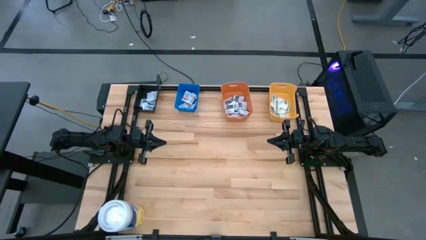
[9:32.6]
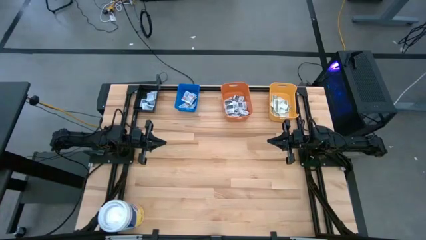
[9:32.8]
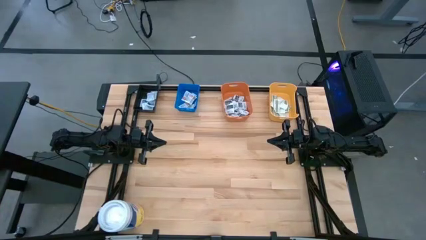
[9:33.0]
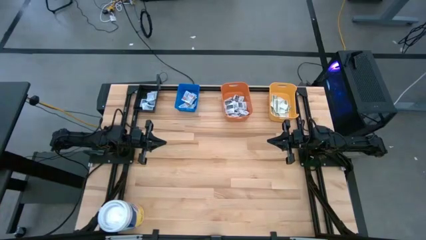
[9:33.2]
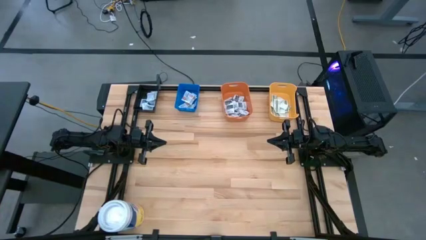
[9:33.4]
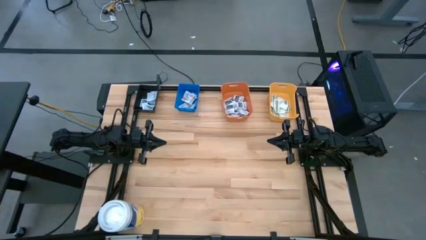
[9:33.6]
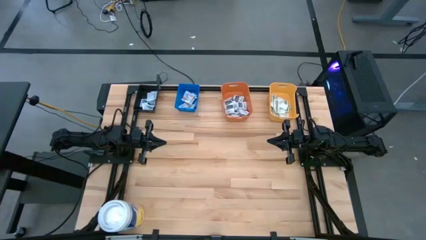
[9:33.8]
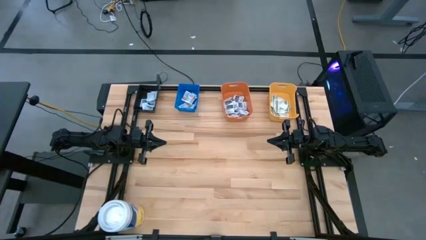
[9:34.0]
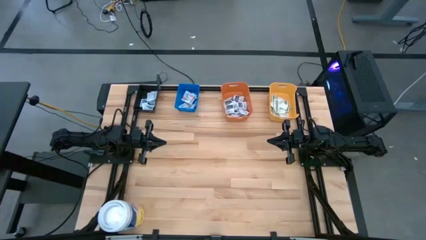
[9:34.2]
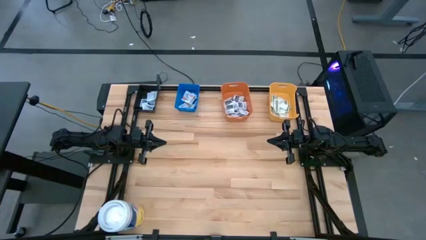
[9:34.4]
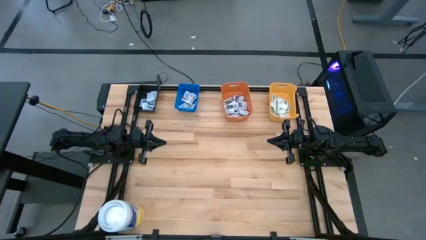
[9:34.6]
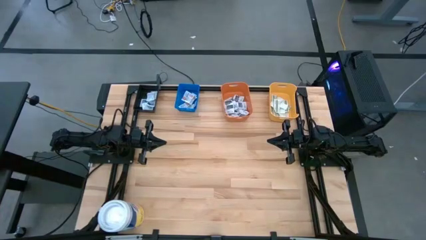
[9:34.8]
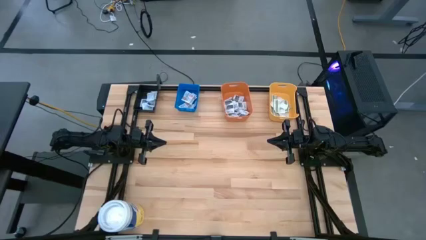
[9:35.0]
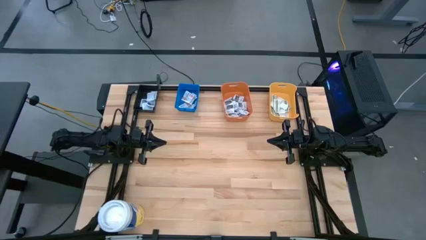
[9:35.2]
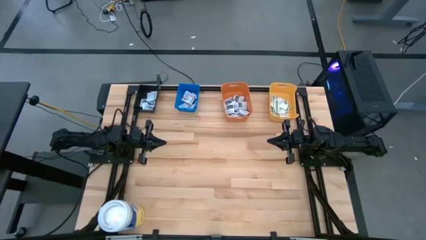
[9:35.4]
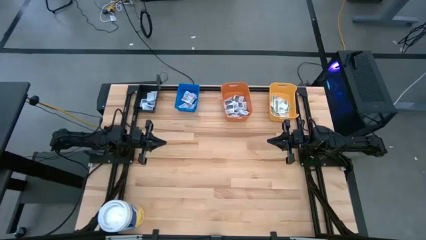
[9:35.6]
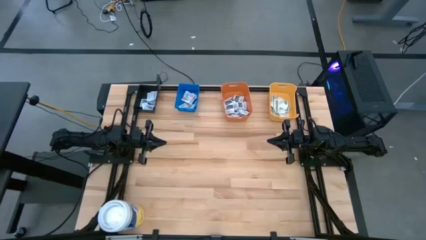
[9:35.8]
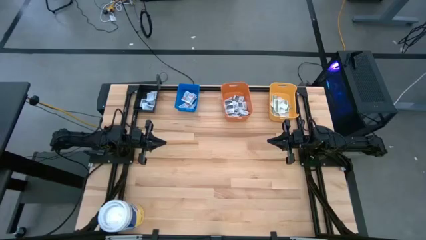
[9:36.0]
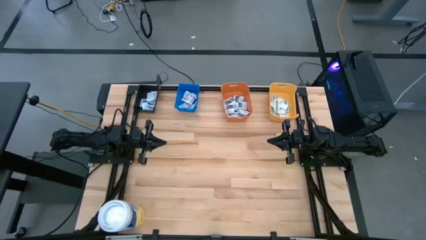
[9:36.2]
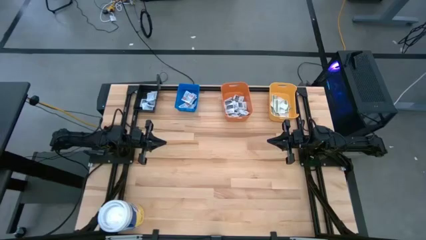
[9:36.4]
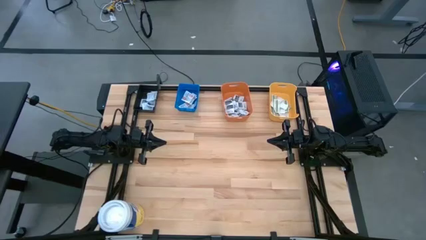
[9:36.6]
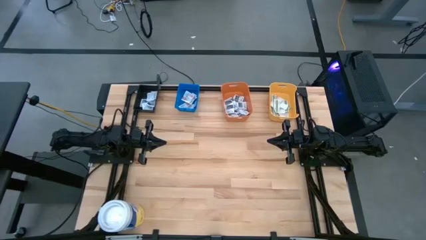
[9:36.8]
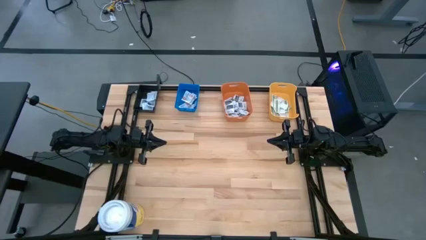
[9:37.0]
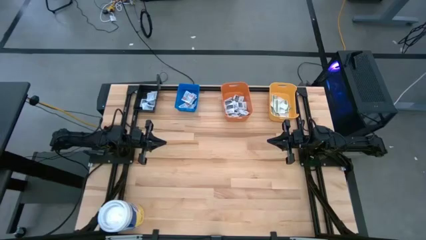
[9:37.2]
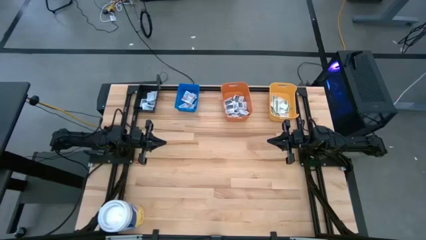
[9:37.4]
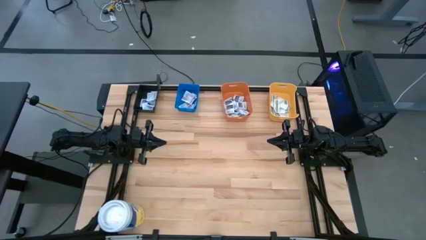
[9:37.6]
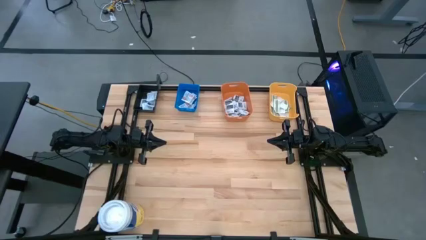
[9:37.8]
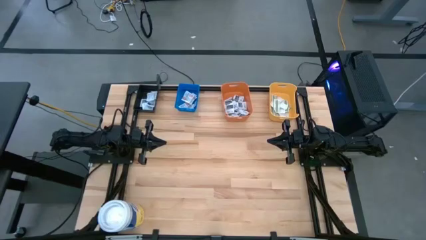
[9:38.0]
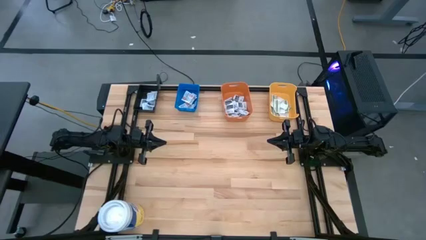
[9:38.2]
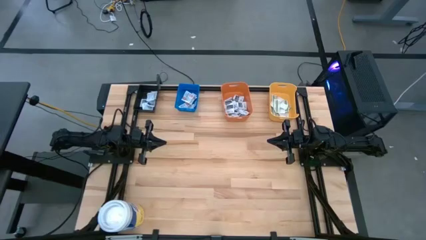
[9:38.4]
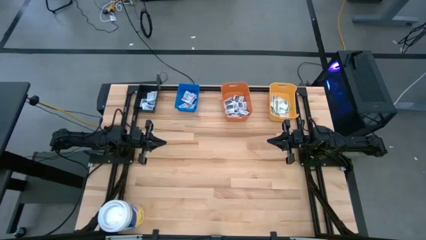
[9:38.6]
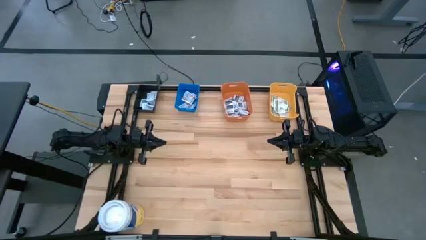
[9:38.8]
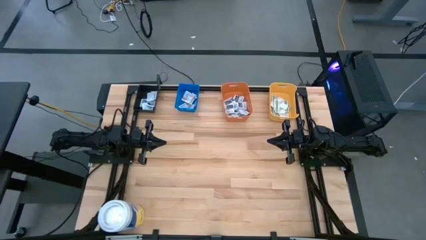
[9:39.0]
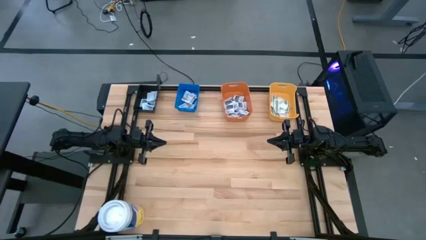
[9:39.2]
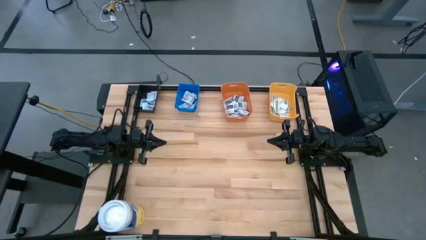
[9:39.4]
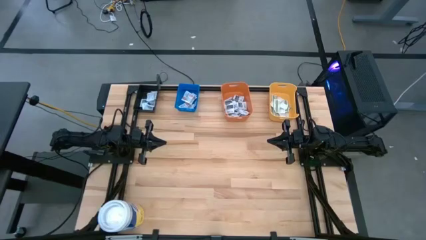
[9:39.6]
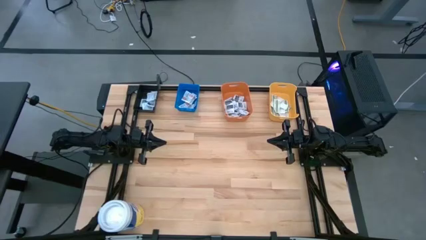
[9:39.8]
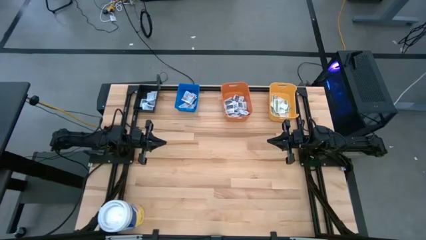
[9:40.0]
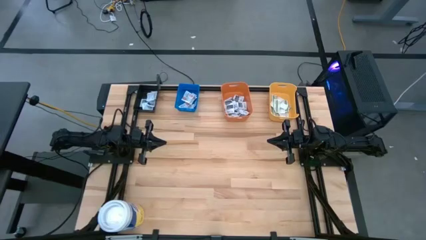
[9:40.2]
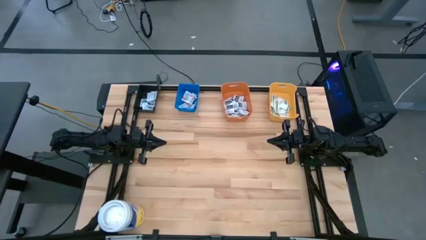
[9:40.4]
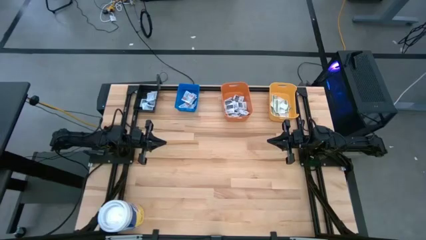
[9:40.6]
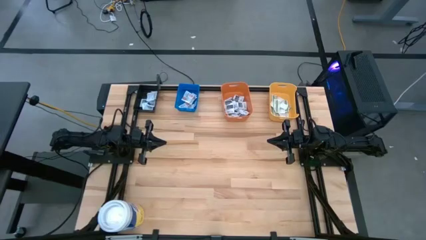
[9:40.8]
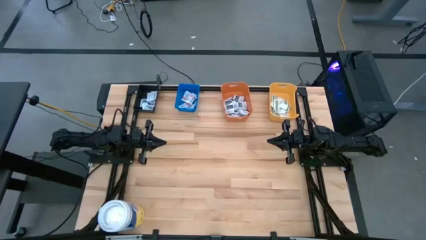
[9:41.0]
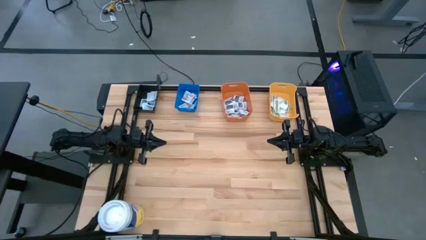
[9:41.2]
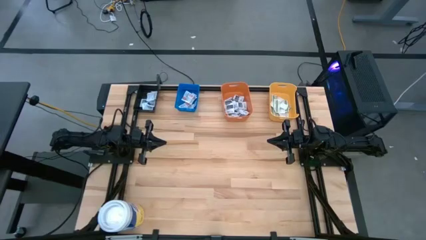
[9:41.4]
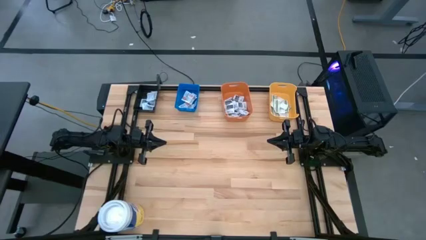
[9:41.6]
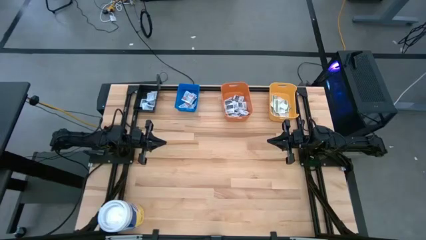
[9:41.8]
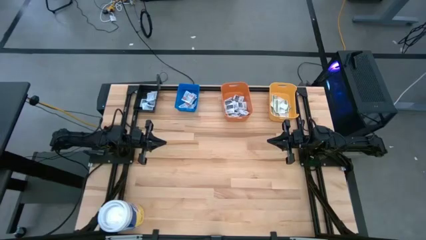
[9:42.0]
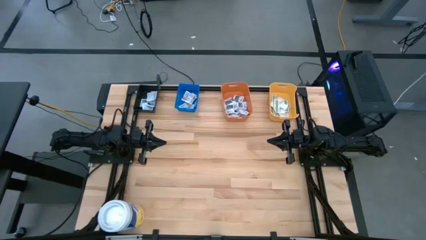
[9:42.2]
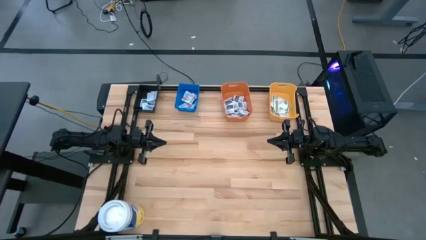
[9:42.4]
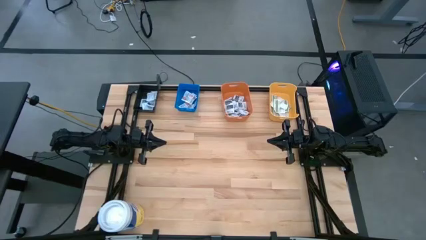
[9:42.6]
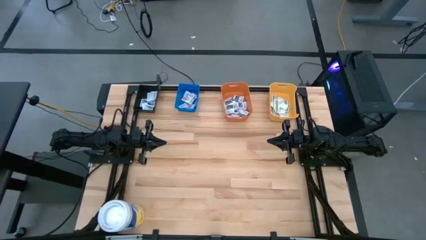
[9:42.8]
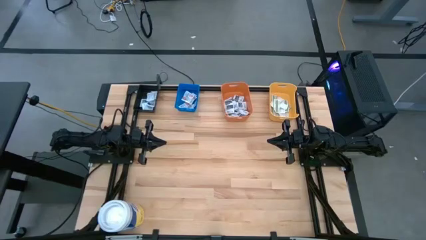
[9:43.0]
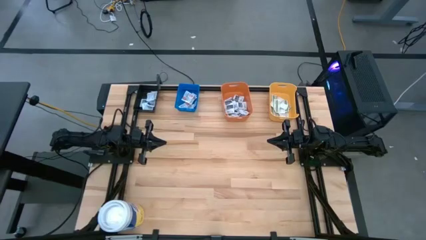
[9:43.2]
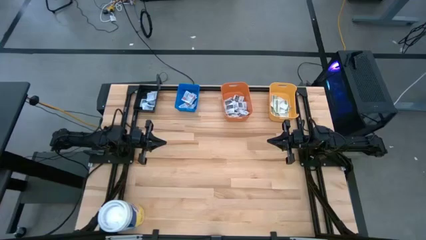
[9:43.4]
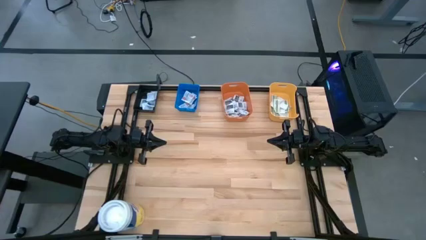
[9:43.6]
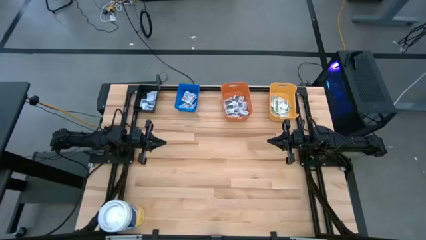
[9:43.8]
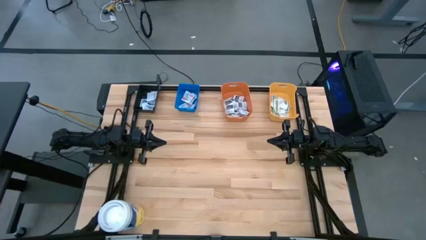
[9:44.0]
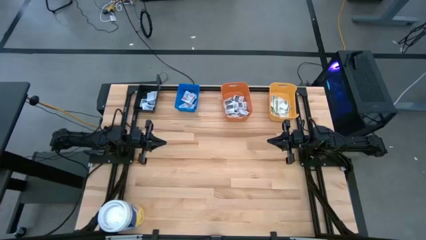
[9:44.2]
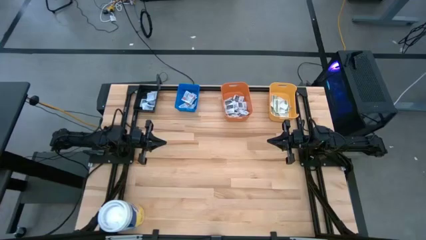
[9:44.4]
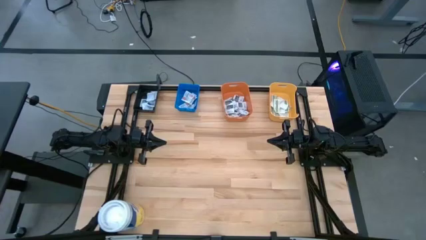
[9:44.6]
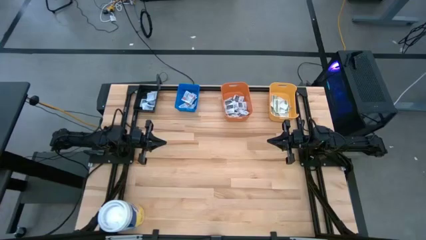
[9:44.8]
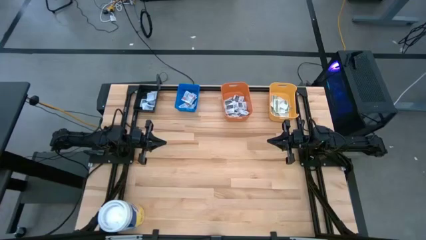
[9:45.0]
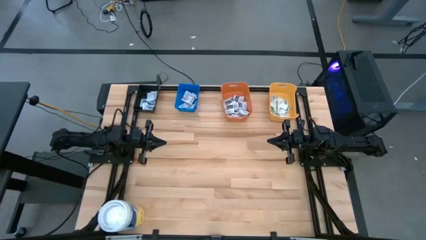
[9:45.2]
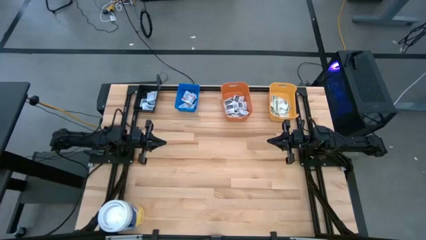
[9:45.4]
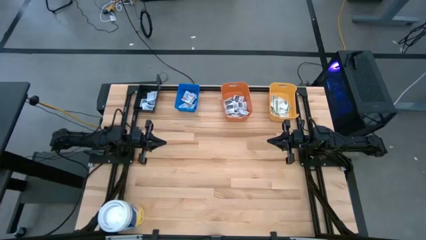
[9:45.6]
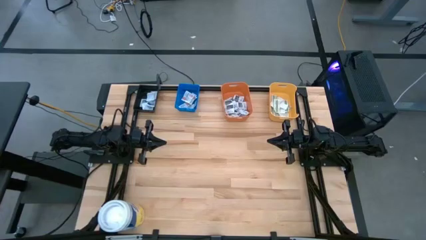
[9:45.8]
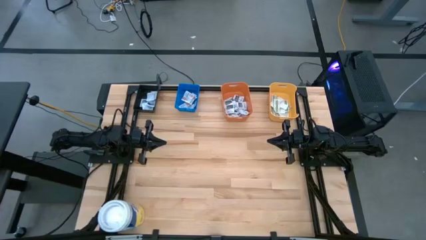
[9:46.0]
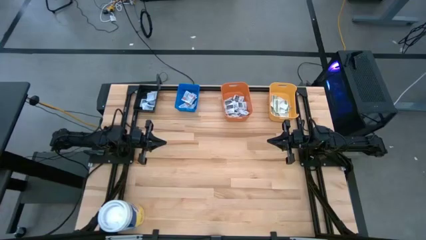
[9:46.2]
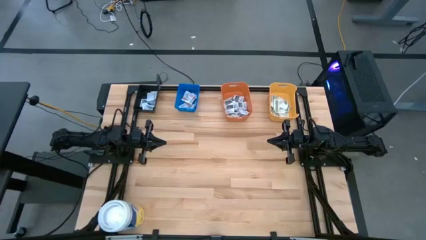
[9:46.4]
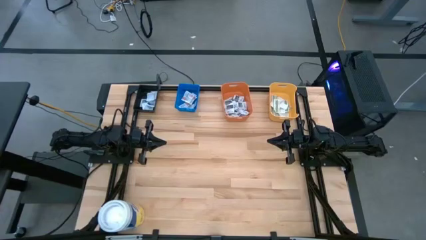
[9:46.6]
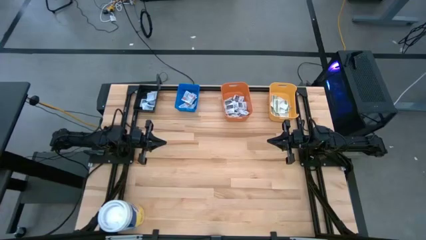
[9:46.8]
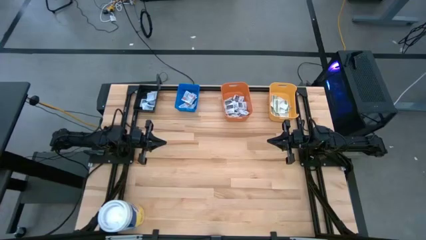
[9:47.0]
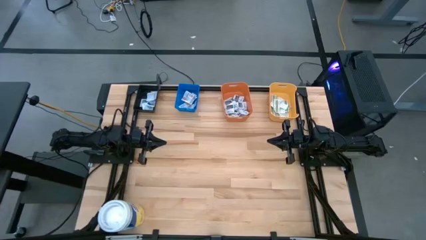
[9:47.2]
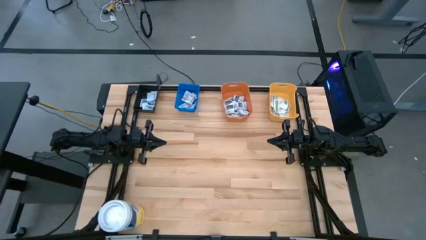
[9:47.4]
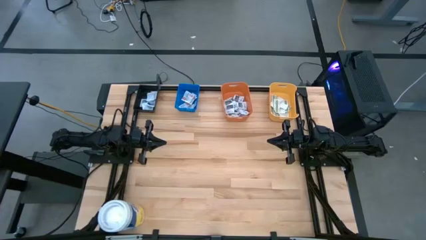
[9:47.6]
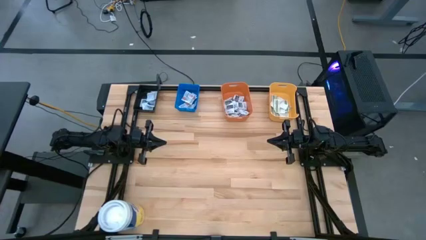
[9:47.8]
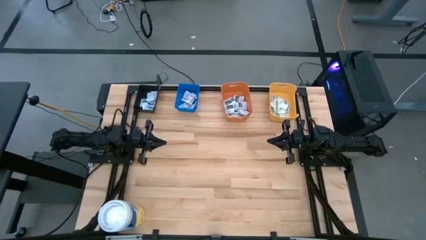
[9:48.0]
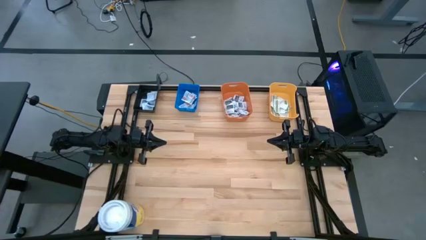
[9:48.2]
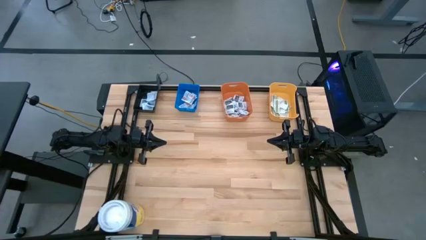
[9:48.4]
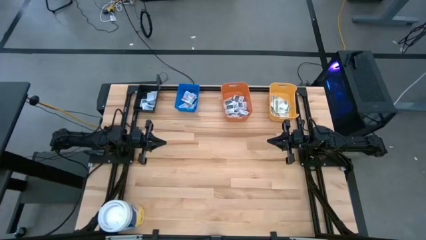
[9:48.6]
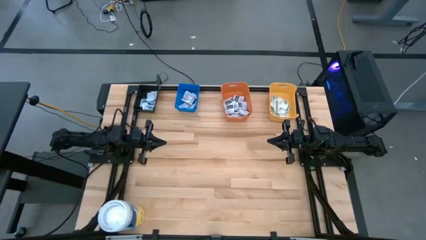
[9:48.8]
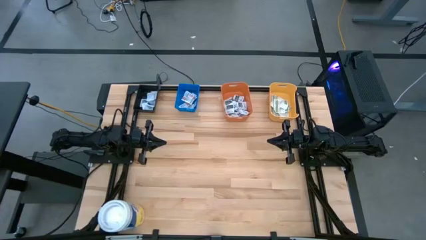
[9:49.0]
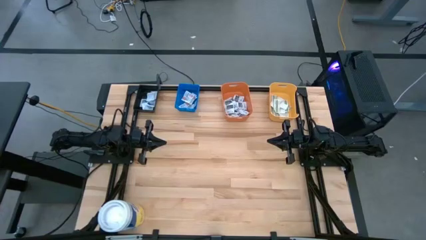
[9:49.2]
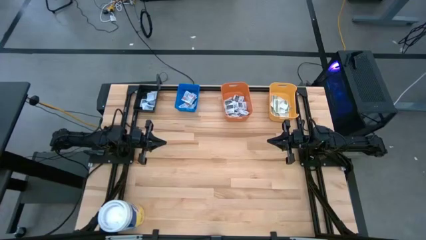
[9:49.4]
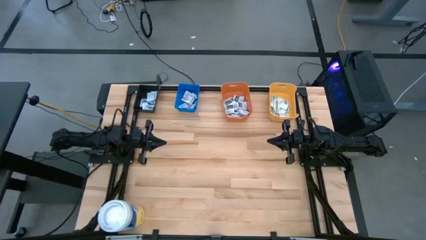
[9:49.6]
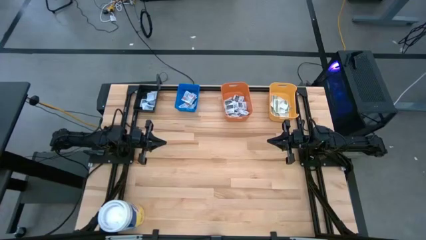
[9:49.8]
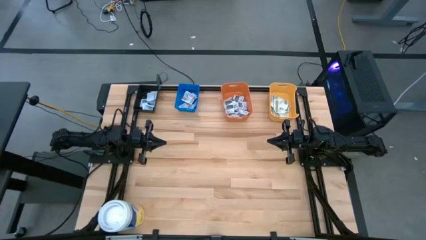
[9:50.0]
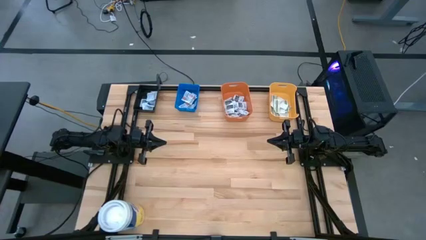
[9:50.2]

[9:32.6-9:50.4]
Task: Pick & Place First Aid Supplies
Return to home position
